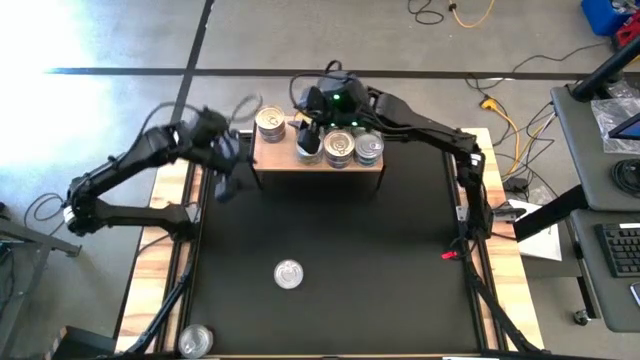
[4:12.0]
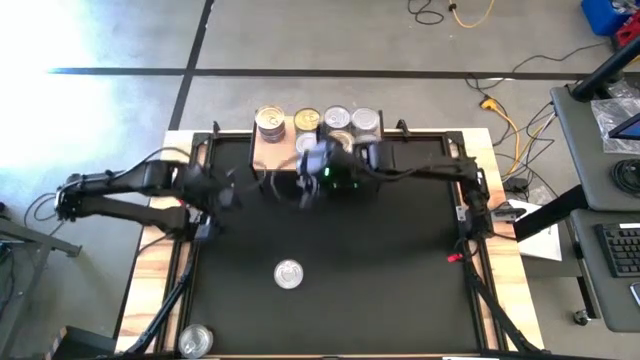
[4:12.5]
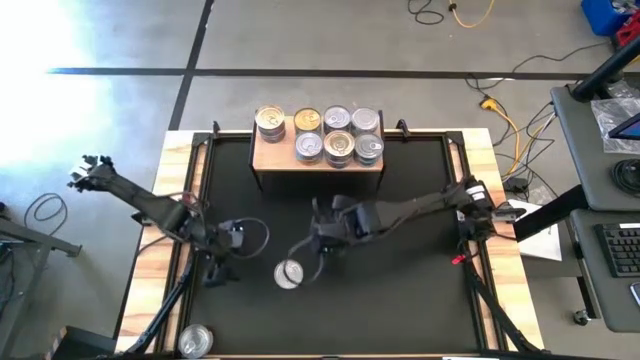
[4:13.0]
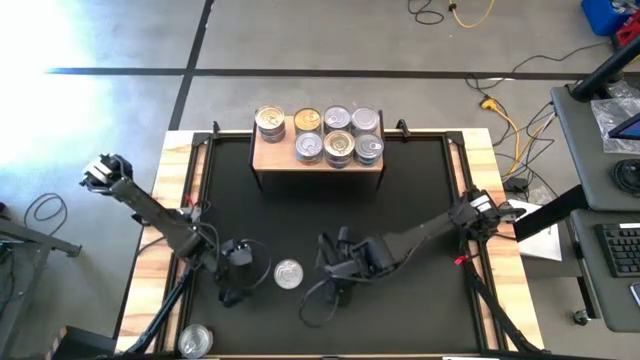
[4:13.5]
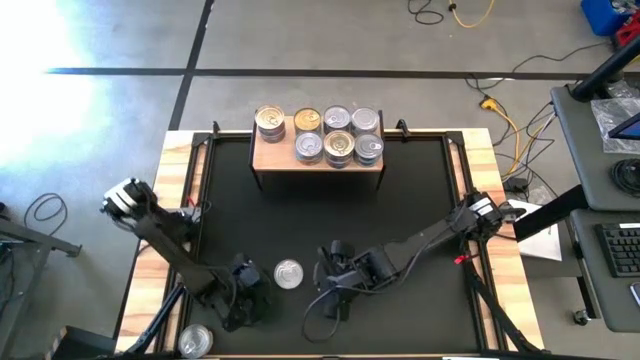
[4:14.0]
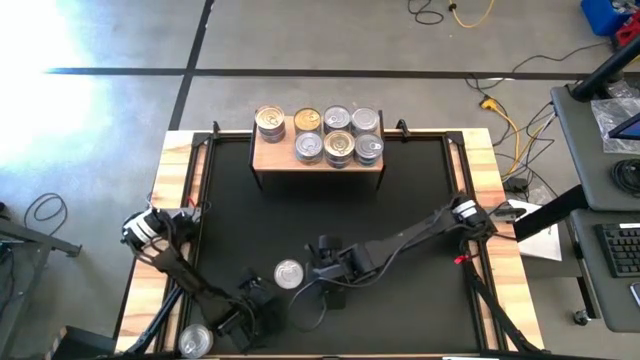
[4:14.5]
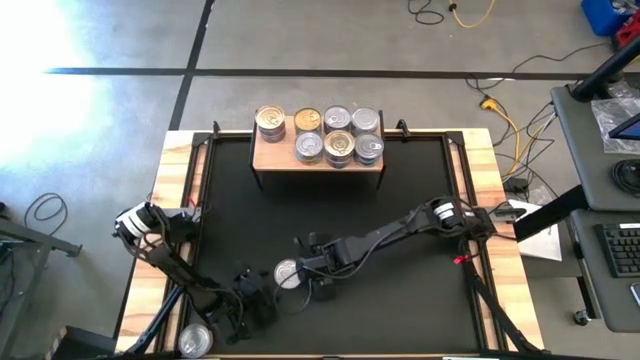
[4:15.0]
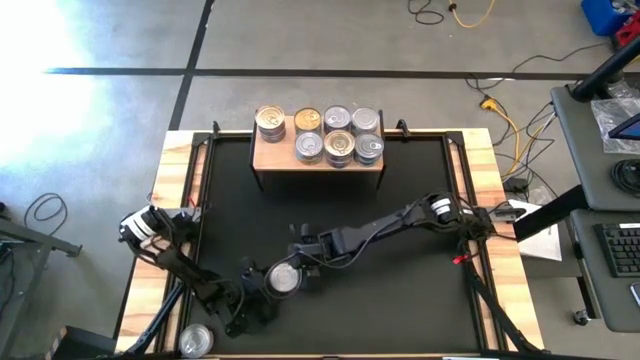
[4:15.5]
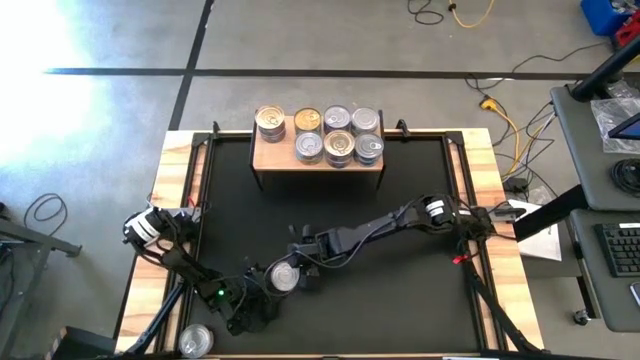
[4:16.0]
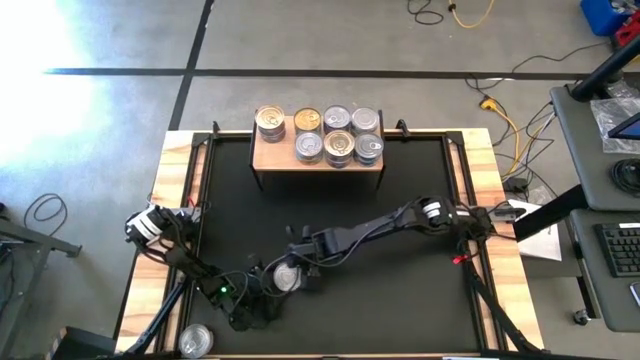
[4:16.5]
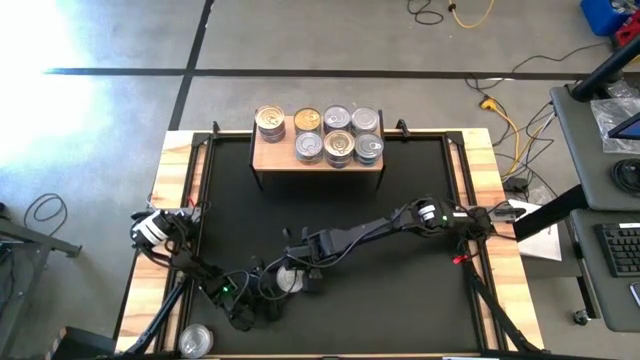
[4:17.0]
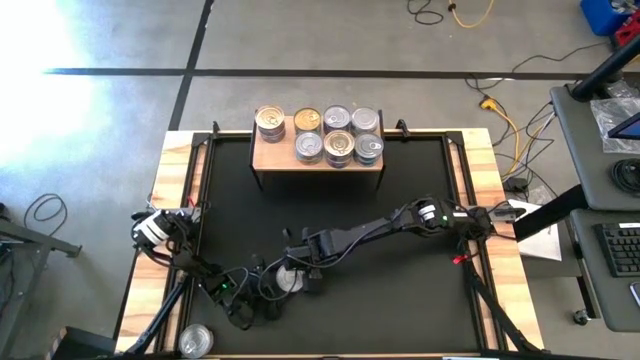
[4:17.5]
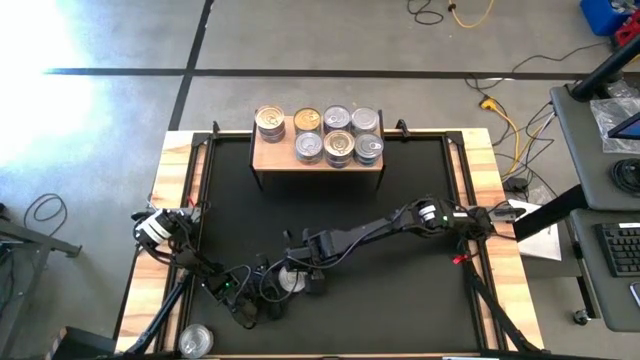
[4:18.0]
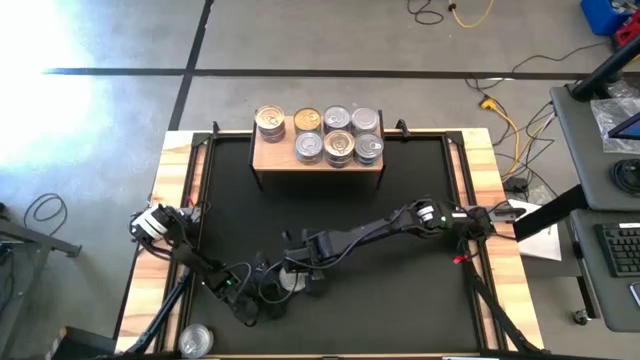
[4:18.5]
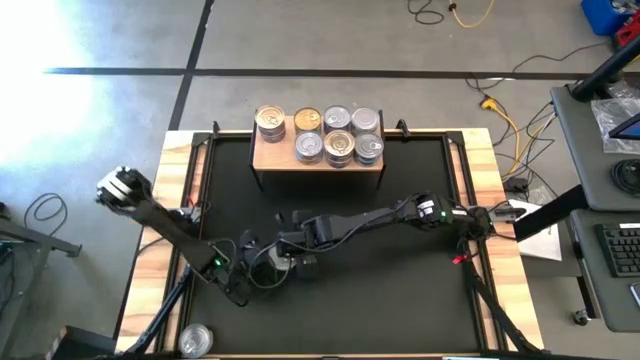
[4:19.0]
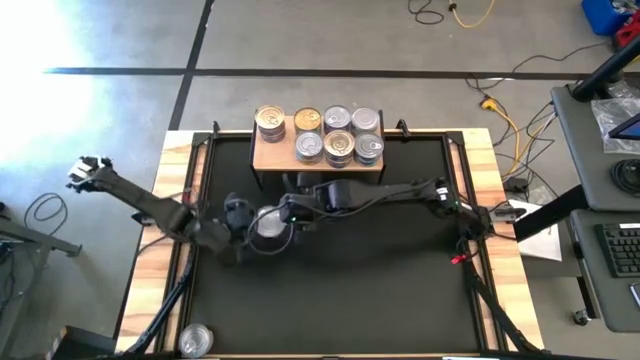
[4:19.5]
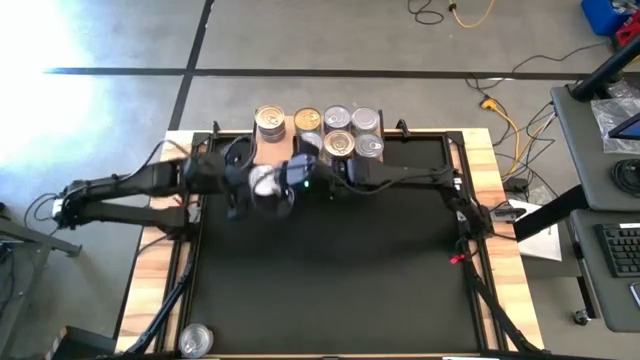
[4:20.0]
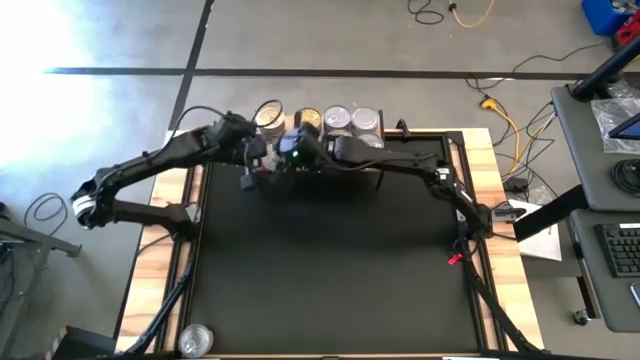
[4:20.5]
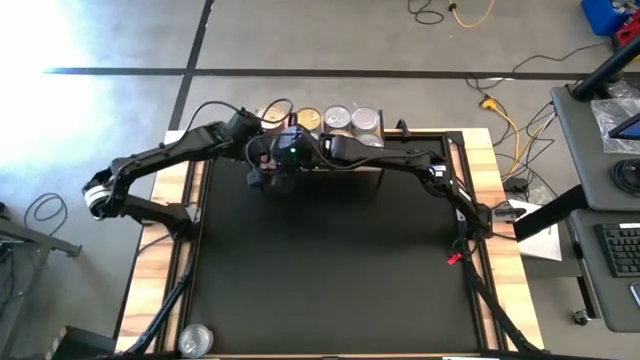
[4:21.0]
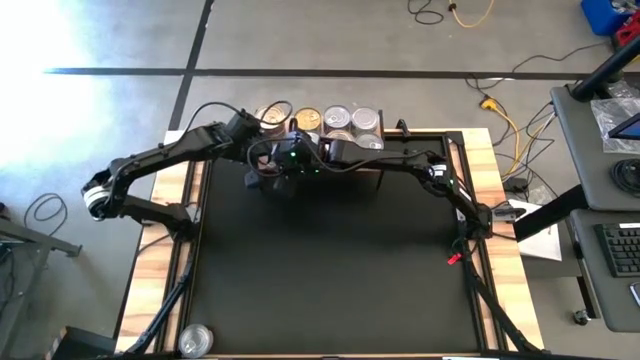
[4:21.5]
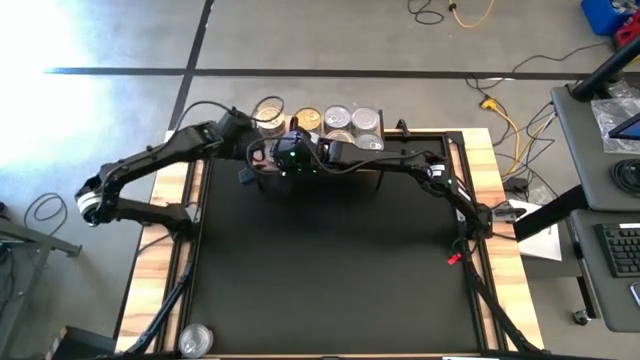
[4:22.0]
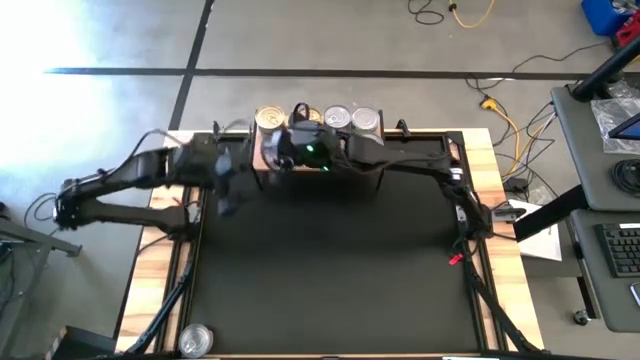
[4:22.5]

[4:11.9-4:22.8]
Task: Stack canned seafood by type on shelf
Put the right red tuna can on the shelf

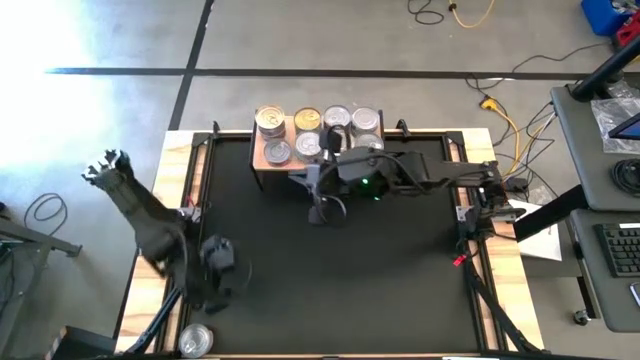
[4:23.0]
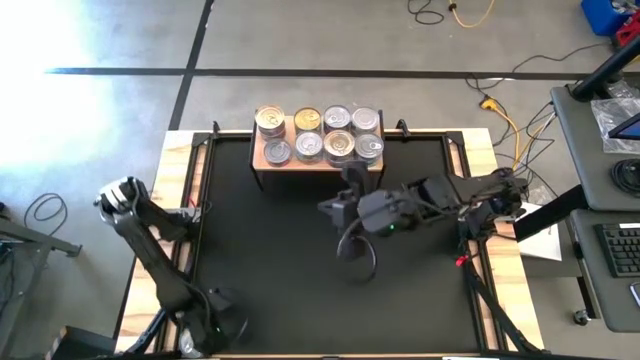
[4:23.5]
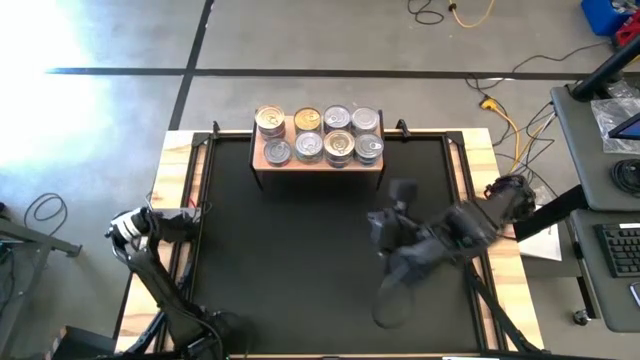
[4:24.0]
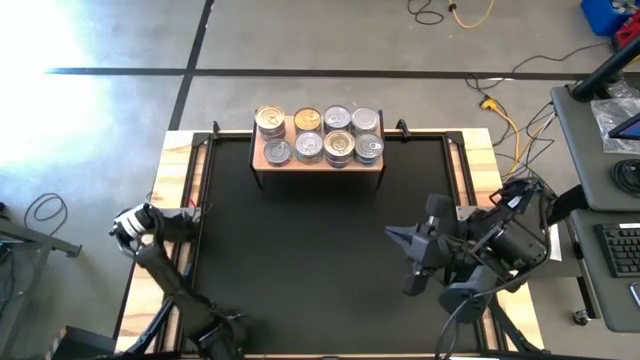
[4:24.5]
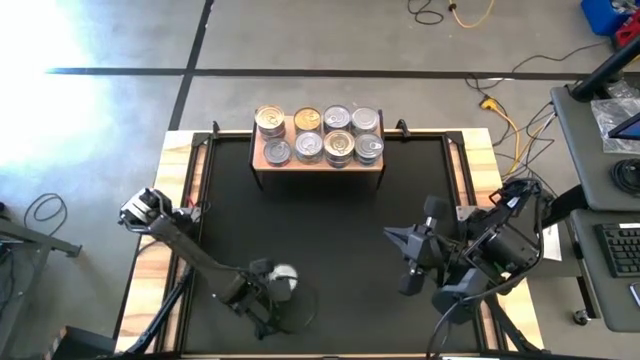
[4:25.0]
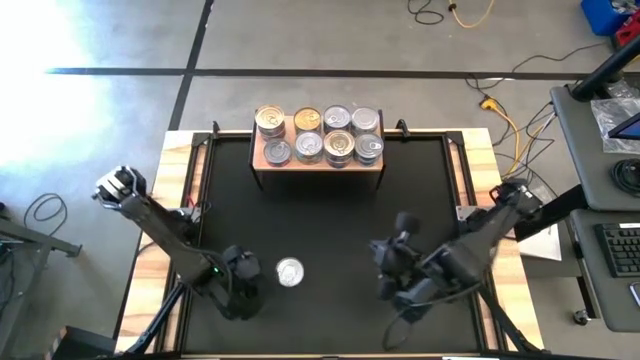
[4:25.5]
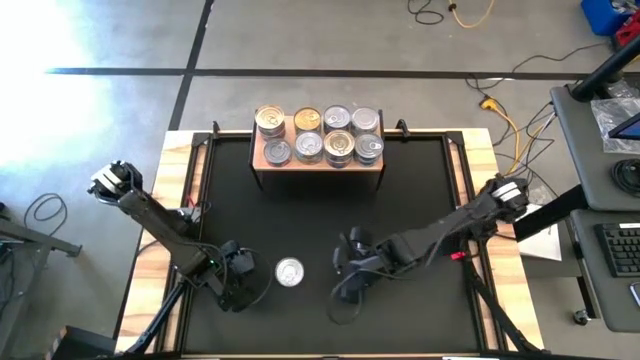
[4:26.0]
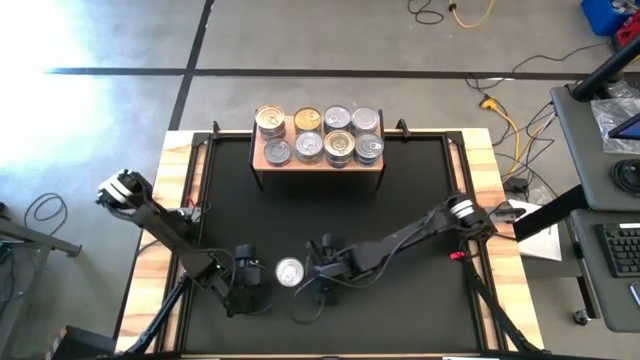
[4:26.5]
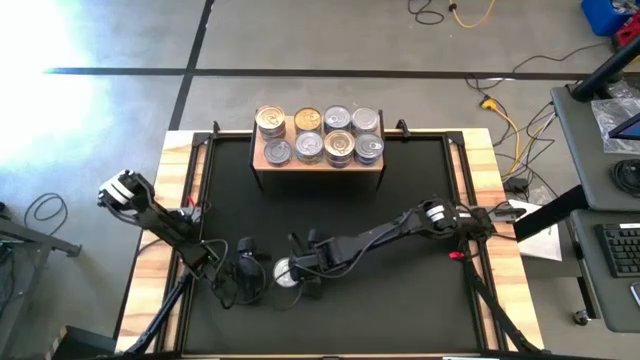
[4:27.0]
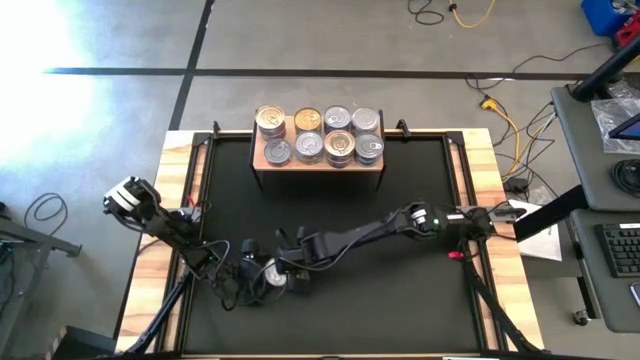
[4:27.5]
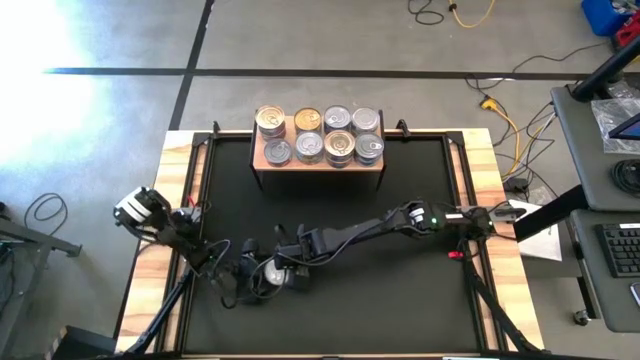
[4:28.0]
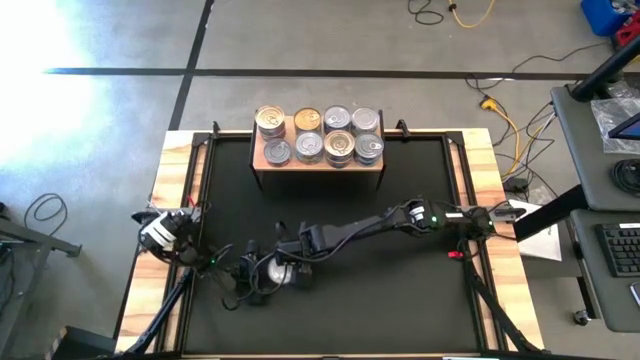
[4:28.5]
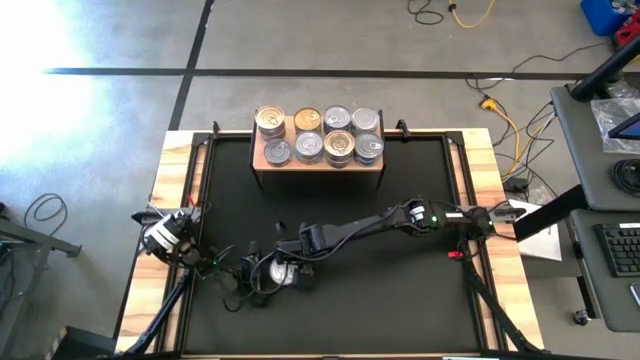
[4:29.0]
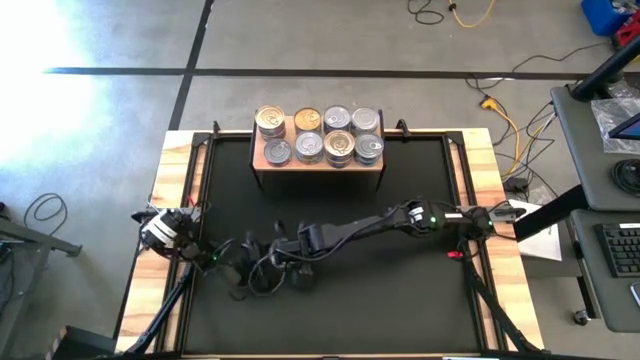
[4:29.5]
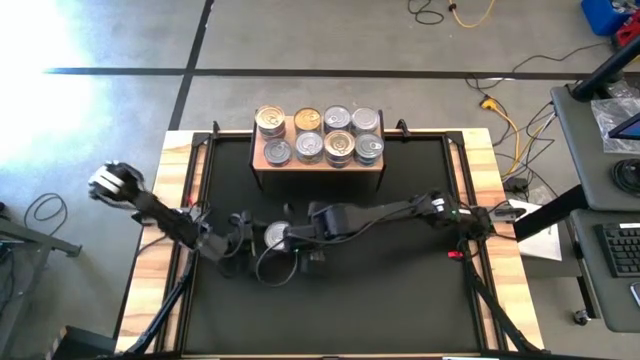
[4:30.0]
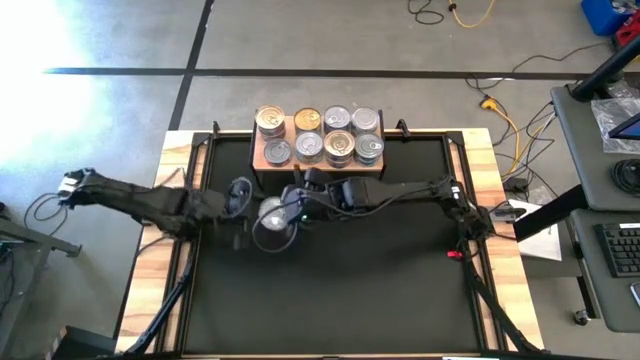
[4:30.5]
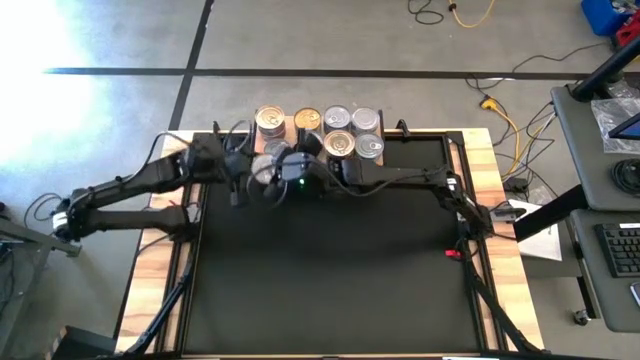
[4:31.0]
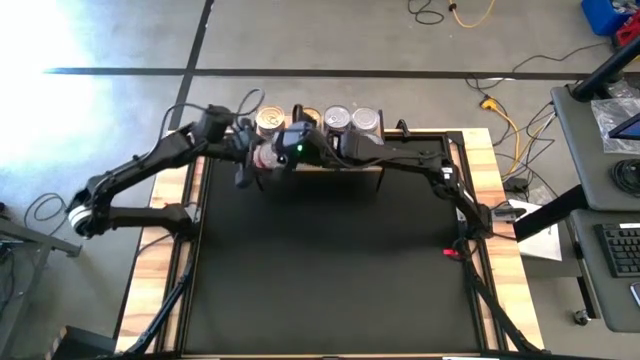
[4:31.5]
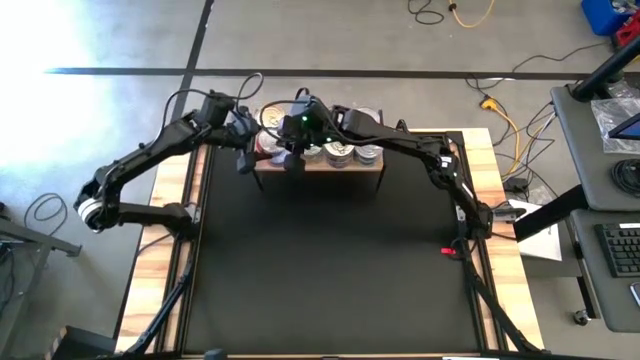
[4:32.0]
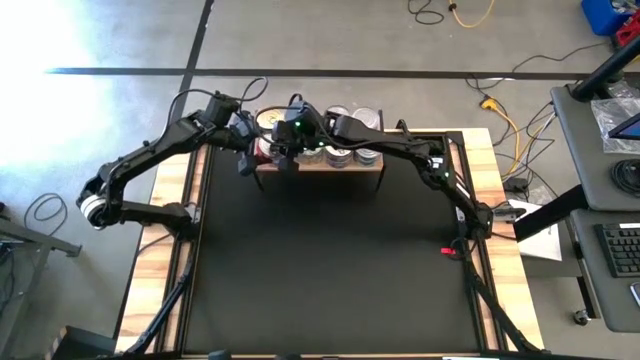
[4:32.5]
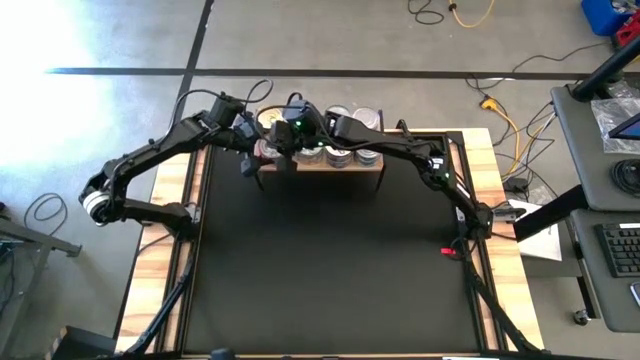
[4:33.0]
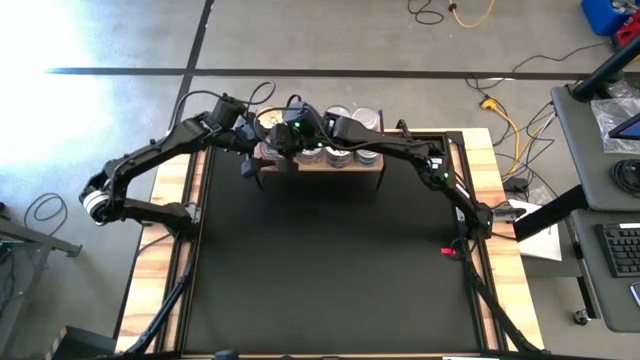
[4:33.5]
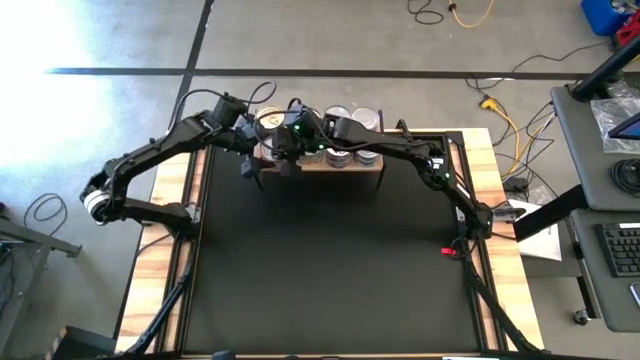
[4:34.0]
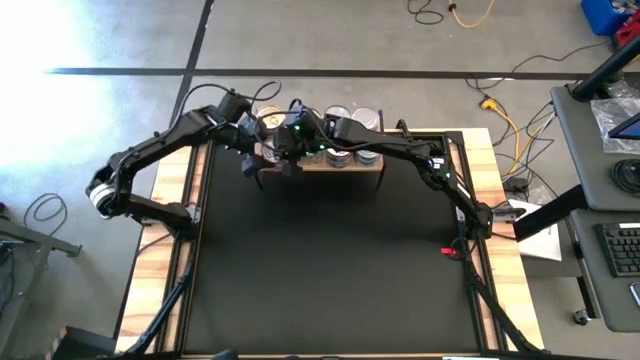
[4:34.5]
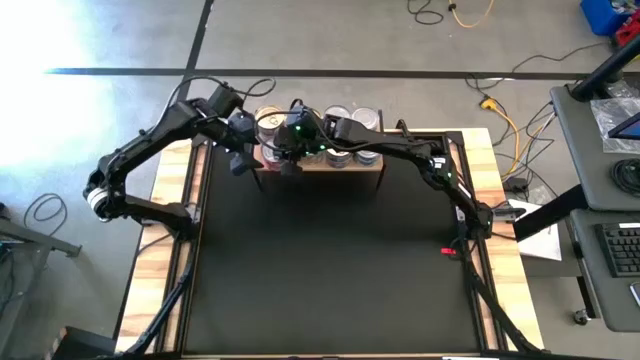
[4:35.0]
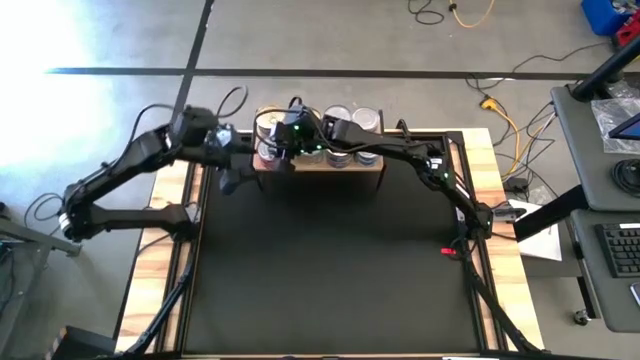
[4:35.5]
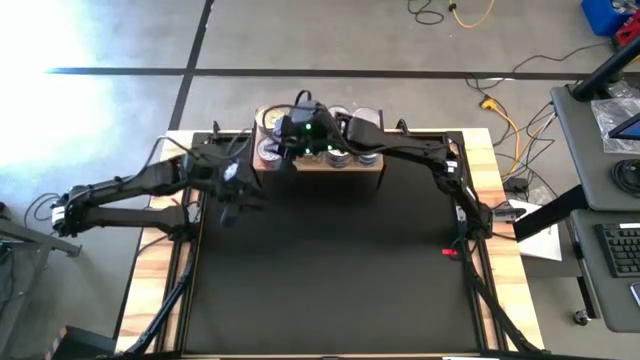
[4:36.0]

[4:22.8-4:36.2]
Stack the red tuna can on the red tuna can on the shelf
